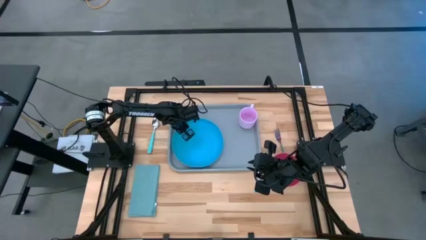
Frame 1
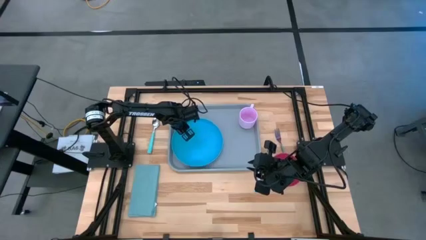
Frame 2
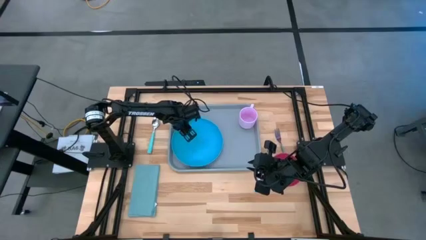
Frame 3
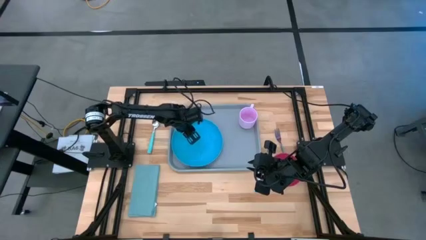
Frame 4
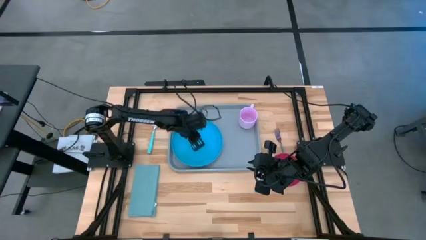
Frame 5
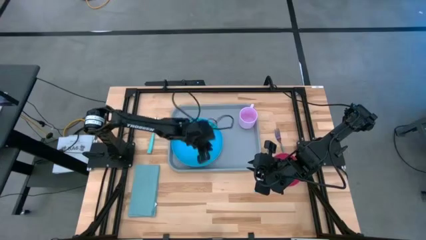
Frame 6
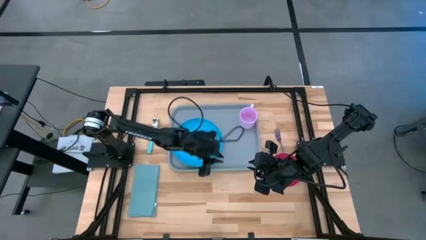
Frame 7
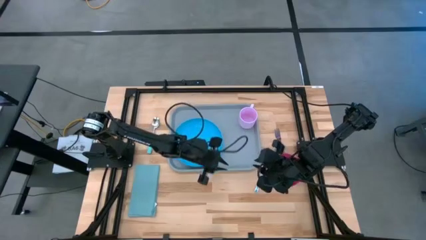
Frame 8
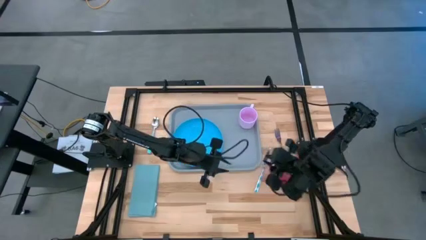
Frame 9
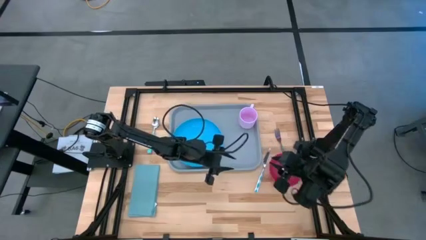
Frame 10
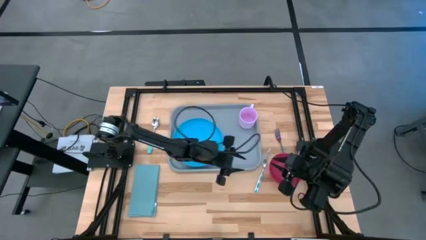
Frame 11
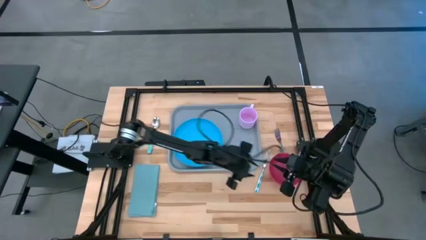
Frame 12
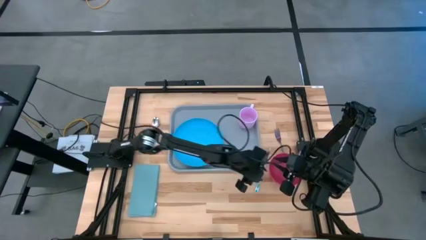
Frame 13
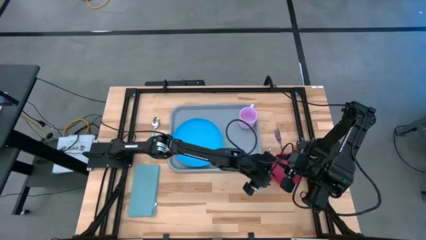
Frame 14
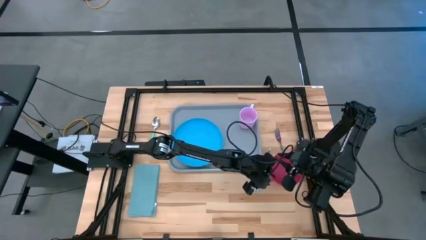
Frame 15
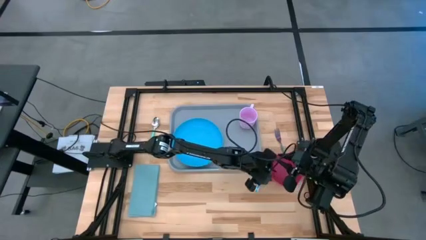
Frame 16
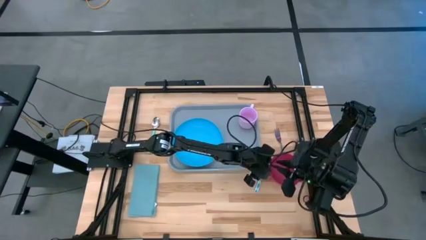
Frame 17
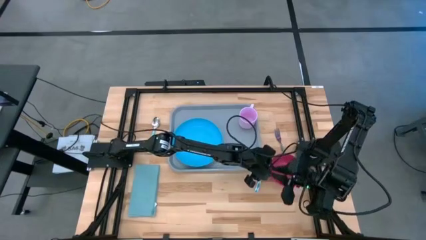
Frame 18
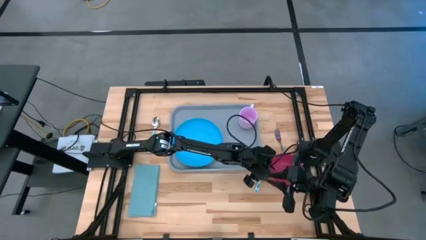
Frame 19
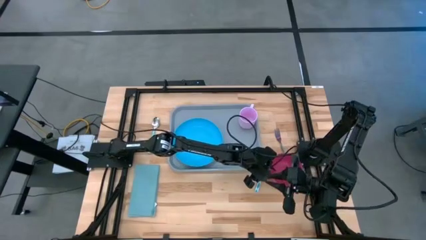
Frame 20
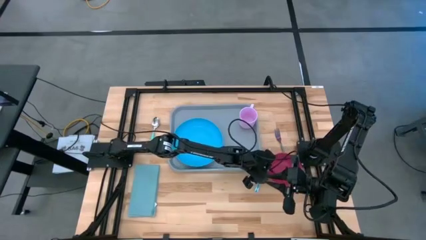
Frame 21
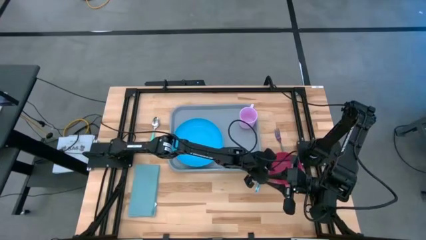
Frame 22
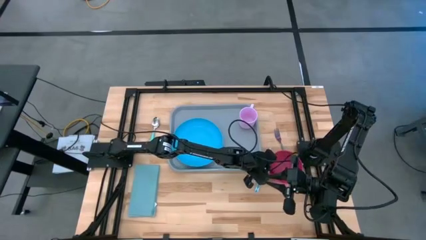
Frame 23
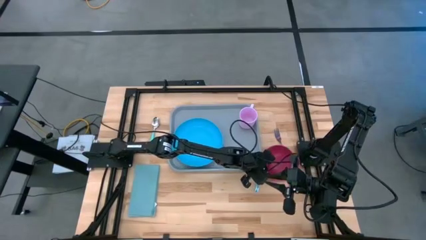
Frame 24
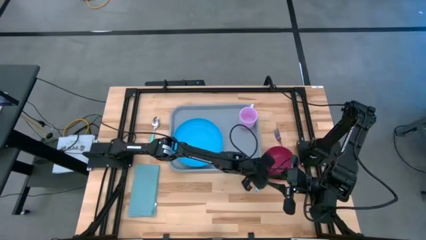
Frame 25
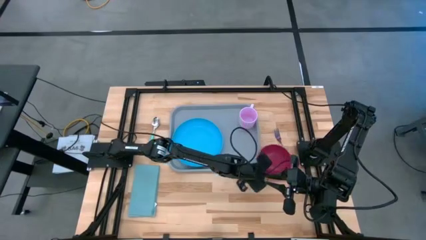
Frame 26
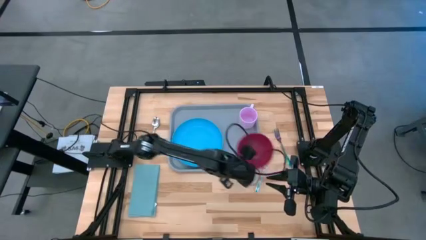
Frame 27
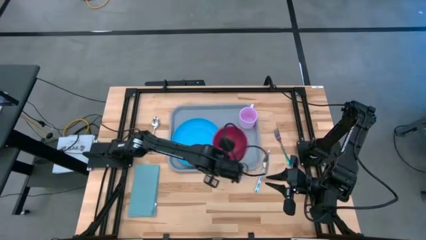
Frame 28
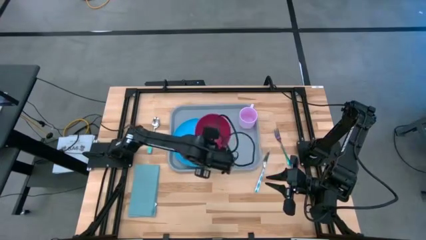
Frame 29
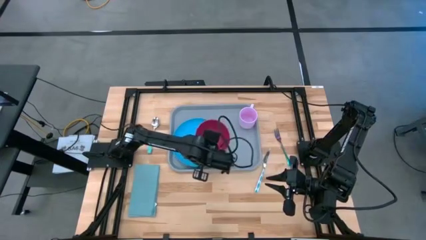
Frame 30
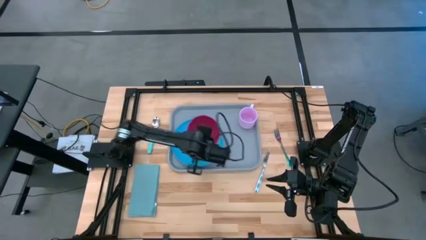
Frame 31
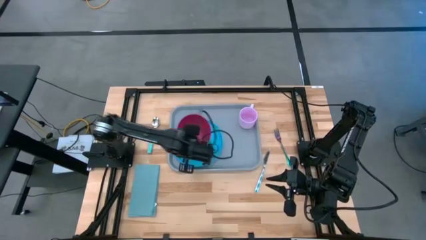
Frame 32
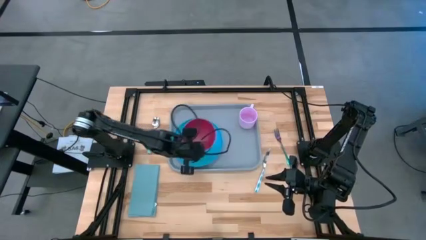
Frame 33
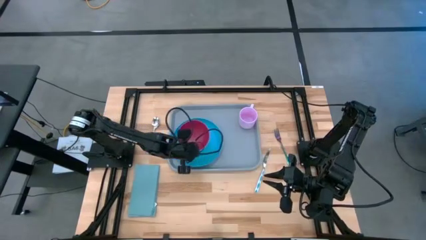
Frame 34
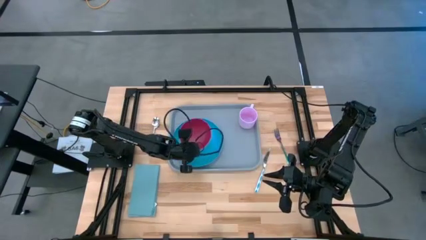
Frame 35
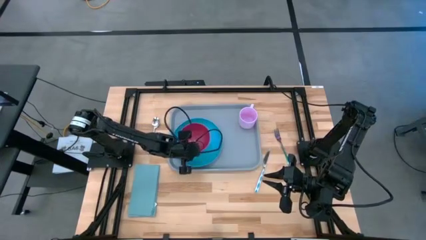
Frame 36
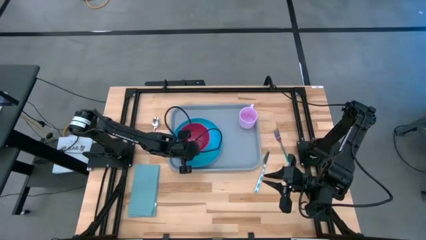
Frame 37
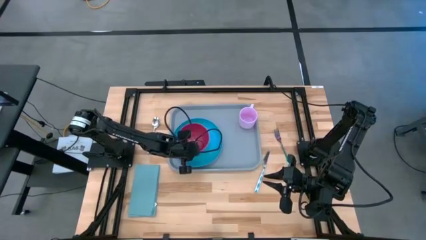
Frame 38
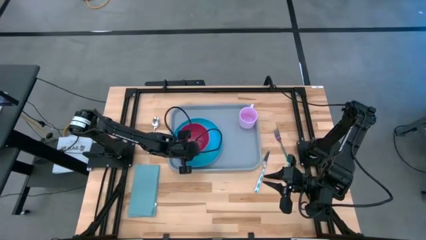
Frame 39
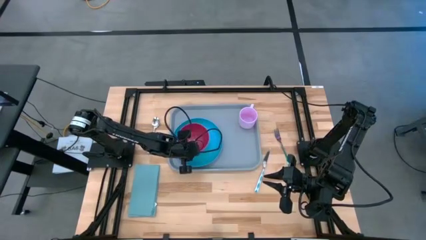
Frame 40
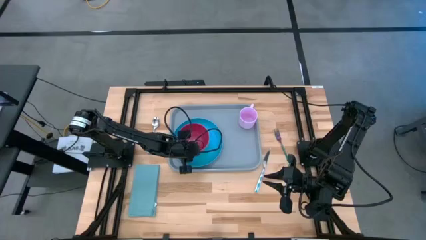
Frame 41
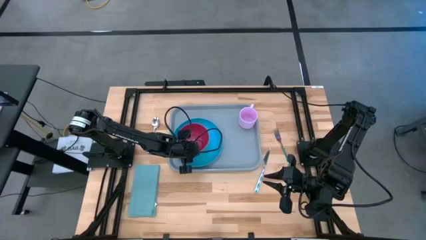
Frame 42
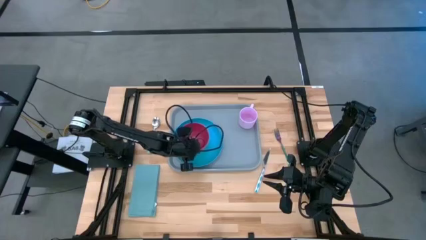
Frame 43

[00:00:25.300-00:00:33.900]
Task: Set up tray
Put the red bowl on the blue plate

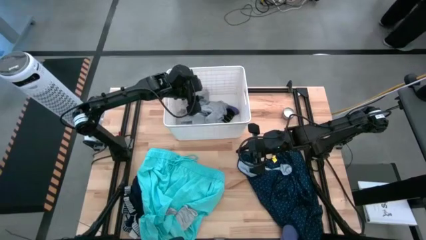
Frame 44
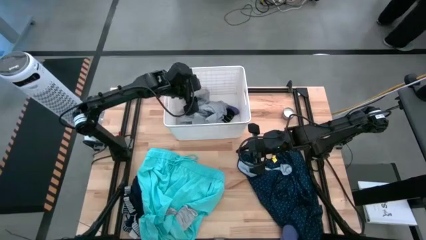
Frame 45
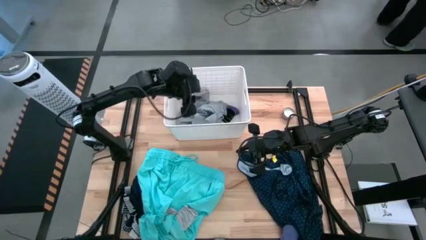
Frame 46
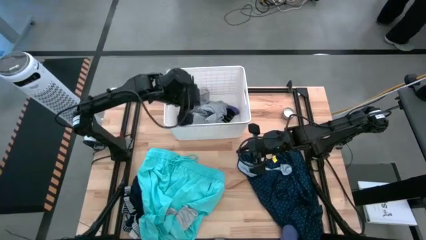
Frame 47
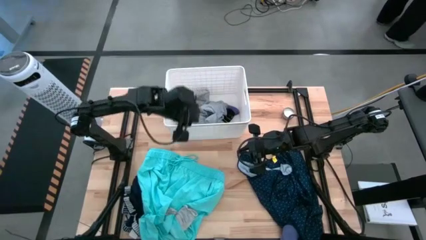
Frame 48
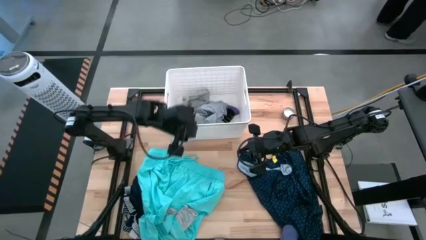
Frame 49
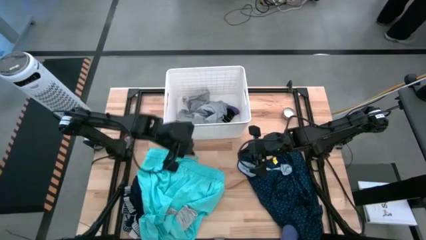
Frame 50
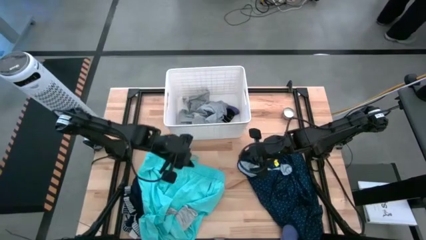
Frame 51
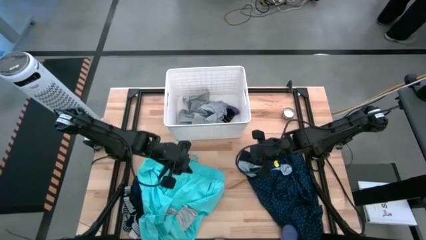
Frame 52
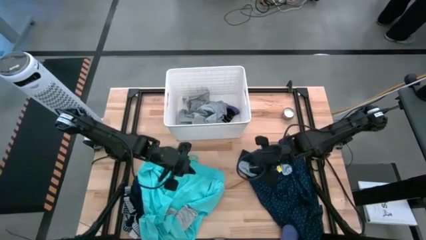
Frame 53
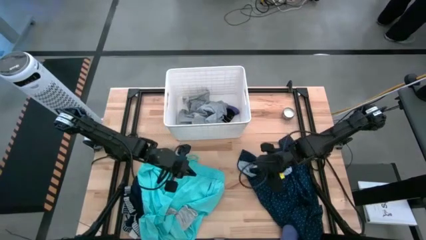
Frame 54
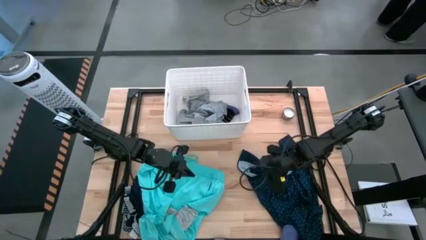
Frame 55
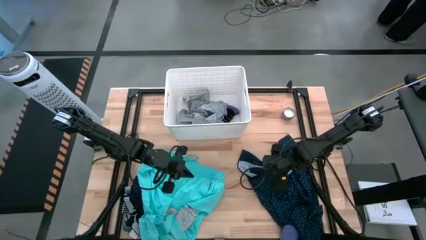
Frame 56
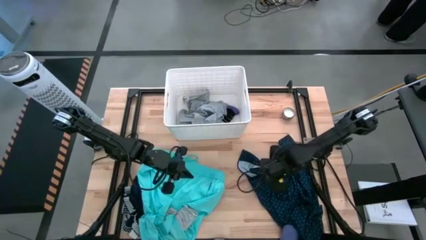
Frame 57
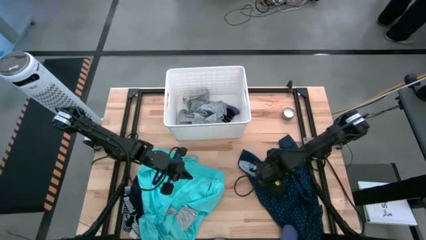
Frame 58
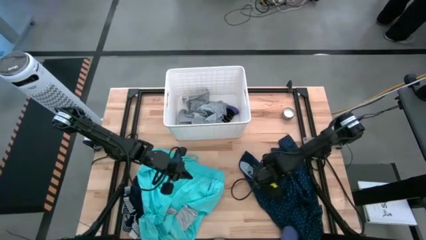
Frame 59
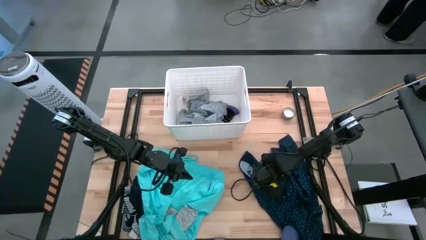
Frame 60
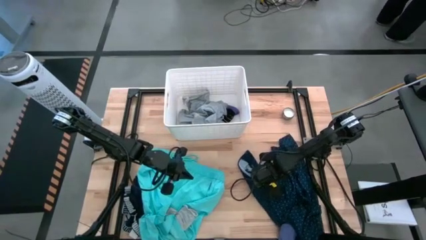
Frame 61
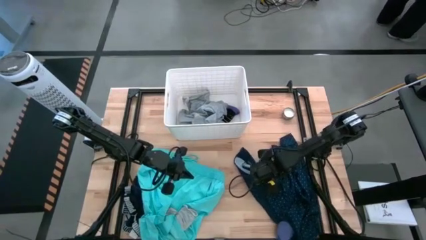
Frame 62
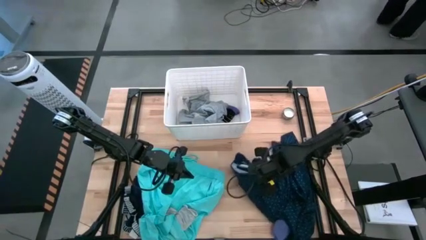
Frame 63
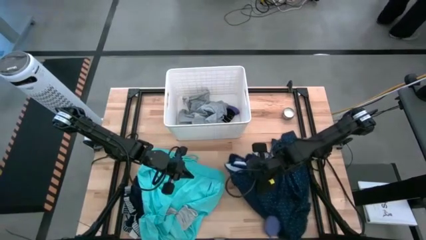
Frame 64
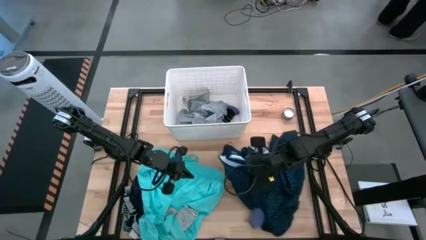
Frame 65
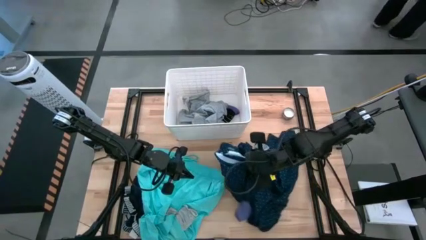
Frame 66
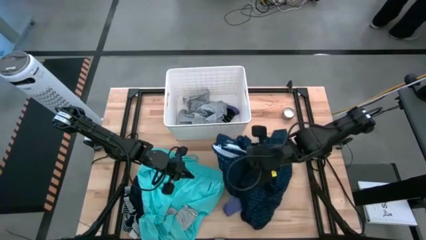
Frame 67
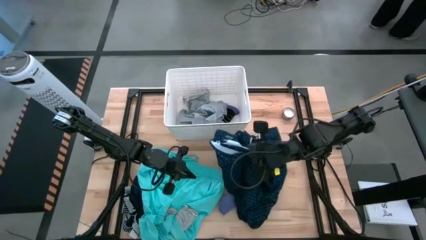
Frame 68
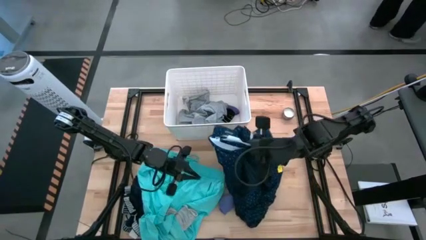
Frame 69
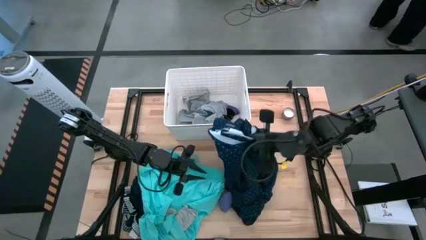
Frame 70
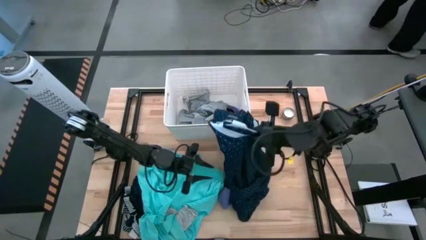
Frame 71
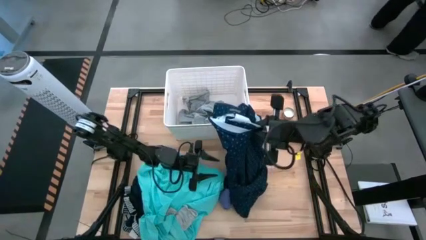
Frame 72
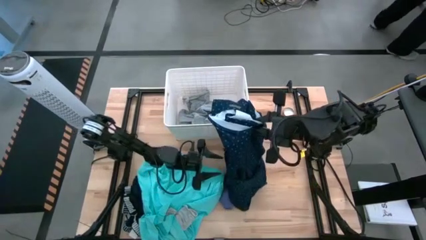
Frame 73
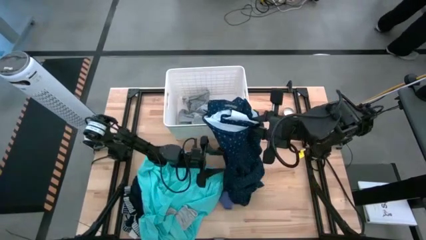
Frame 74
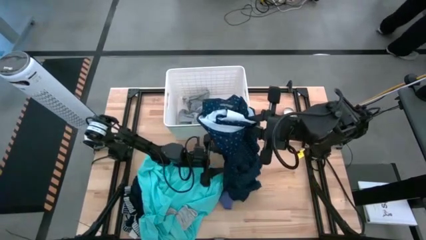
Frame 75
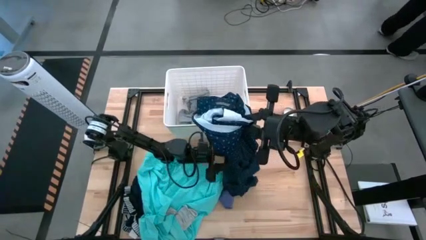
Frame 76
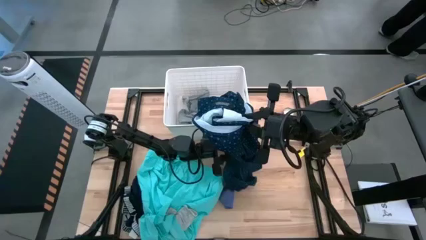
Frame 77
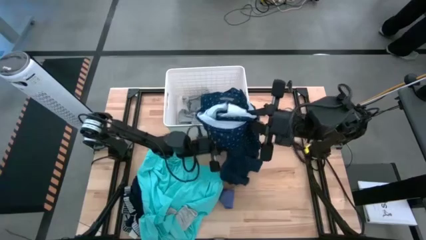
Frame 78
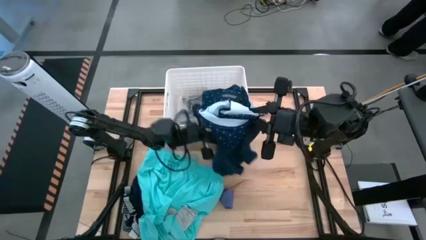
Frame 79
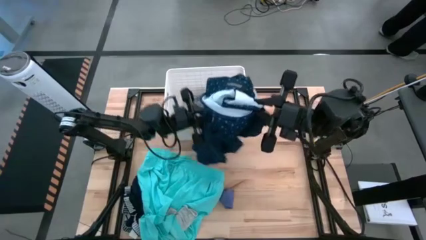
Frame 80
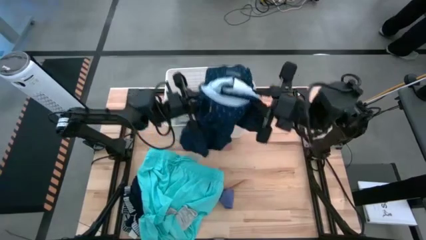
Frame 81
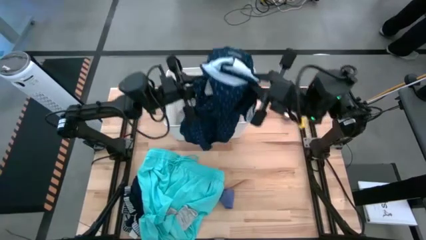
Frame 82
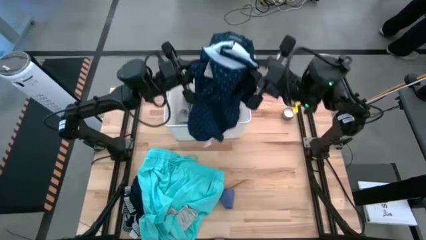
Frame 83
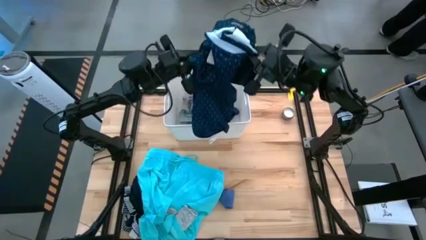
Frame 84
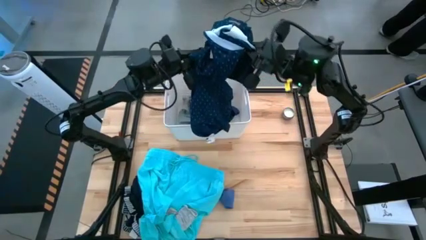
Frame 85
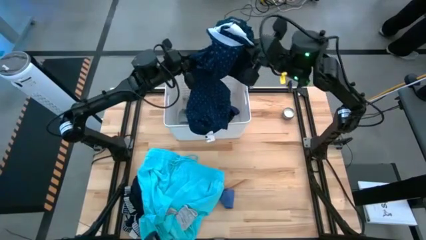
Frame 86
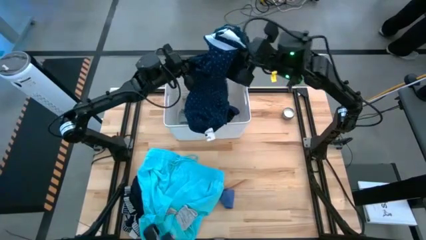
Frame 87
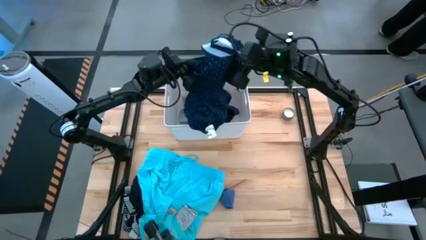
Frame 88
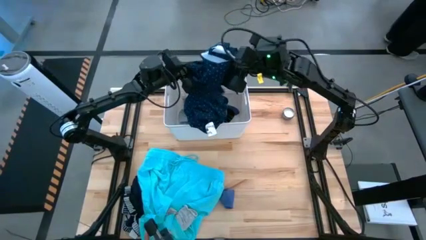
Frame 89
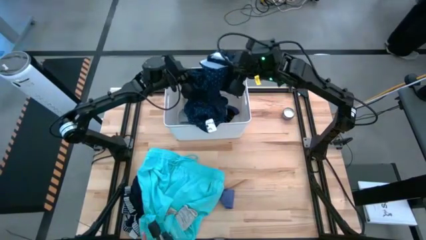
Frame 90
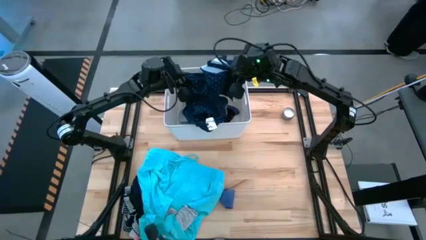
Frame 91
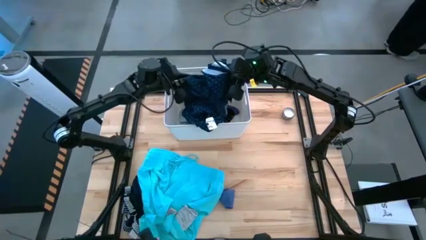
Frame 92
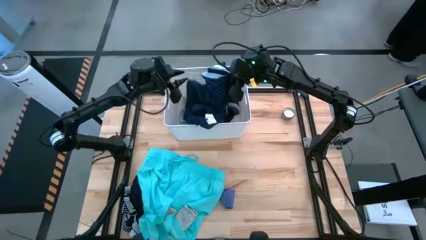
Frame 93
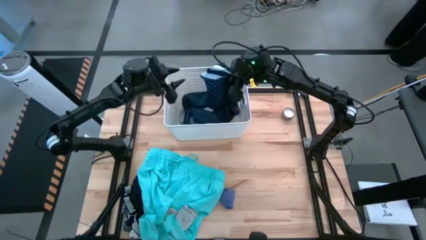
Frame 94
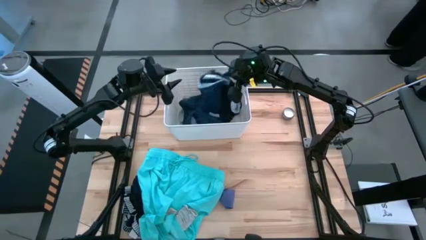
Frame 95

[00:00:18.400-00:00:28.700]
Task: Sort clothes
Put the dark blue shirt into the white bin
